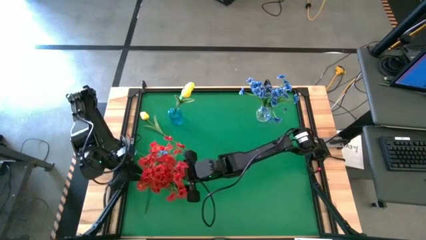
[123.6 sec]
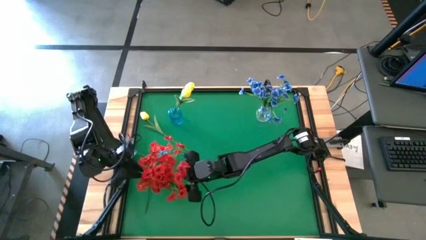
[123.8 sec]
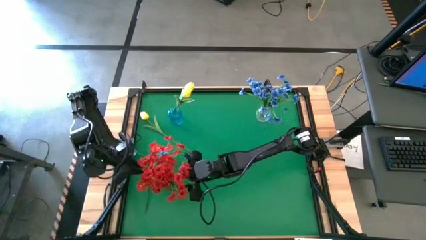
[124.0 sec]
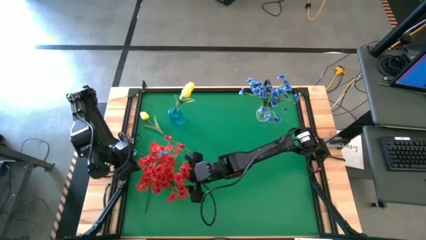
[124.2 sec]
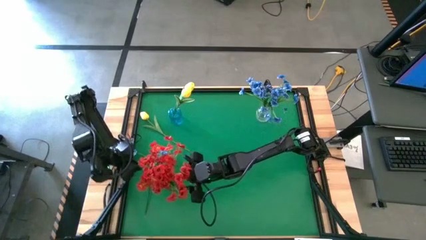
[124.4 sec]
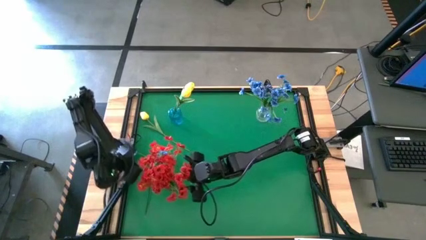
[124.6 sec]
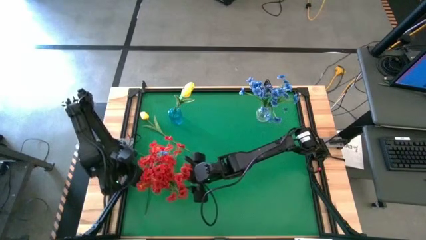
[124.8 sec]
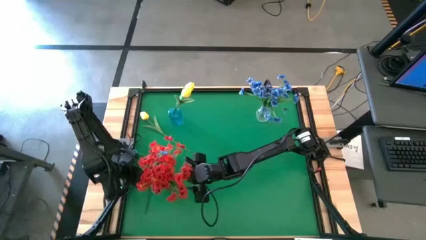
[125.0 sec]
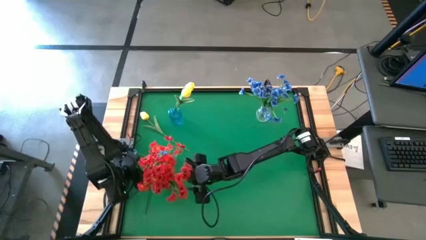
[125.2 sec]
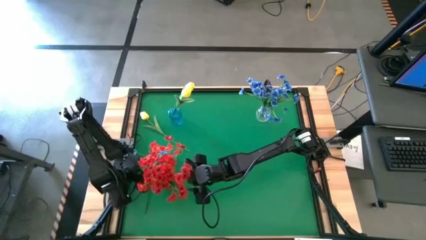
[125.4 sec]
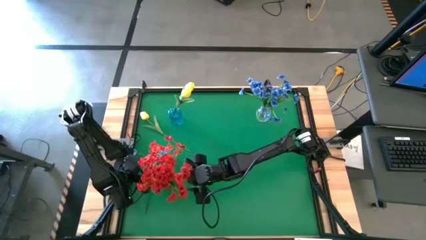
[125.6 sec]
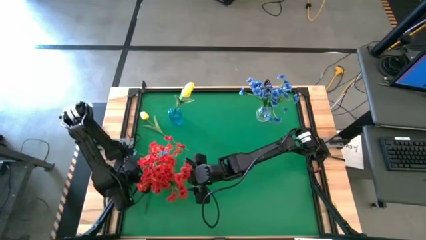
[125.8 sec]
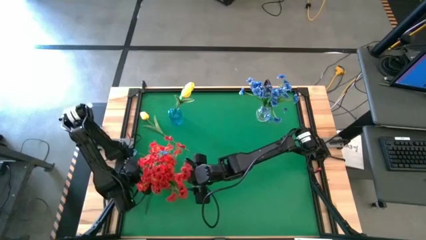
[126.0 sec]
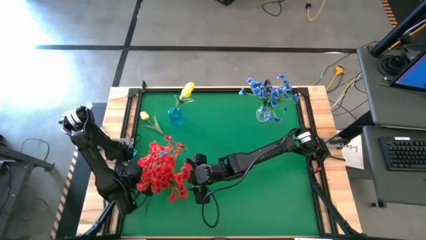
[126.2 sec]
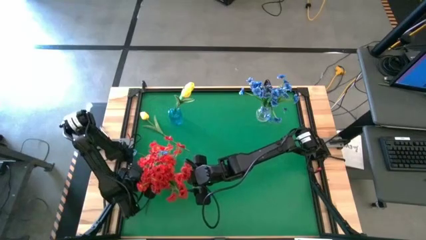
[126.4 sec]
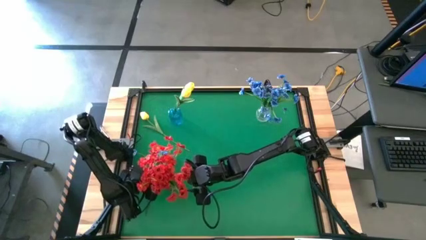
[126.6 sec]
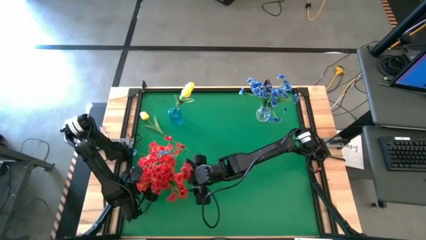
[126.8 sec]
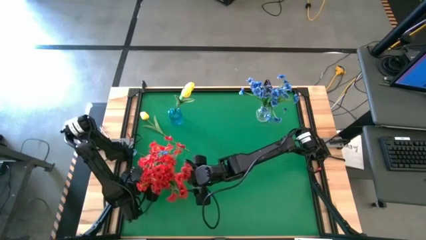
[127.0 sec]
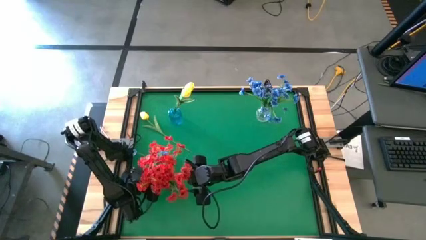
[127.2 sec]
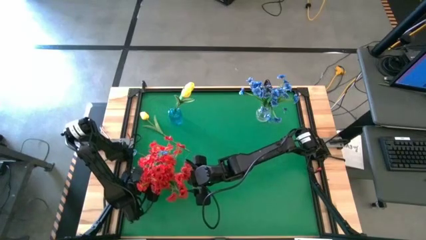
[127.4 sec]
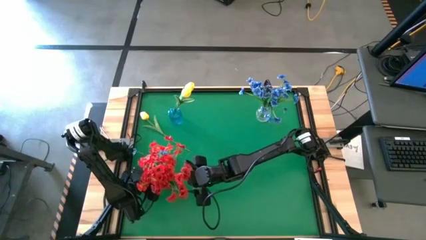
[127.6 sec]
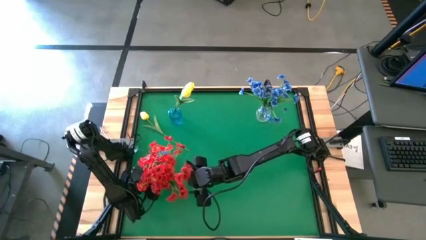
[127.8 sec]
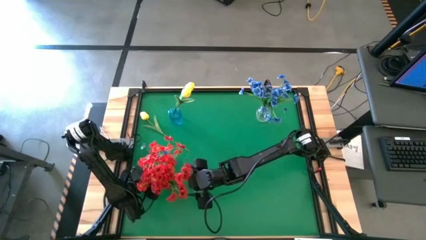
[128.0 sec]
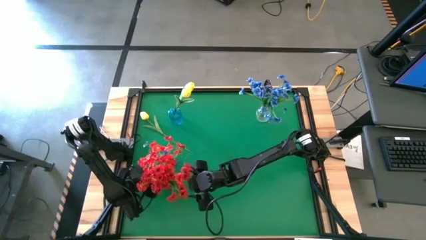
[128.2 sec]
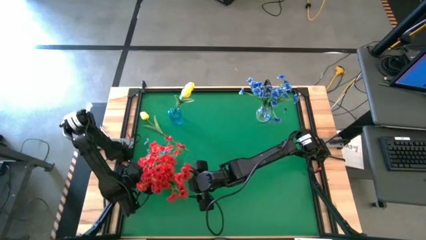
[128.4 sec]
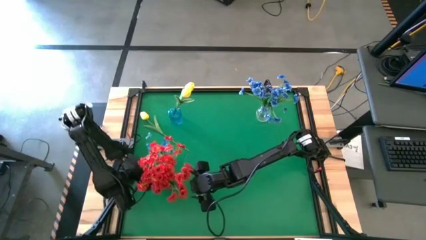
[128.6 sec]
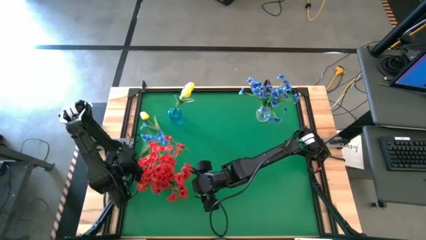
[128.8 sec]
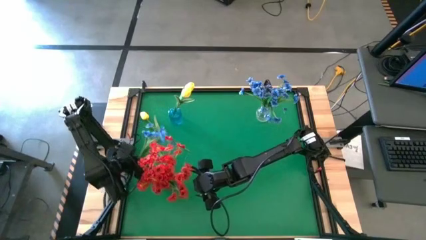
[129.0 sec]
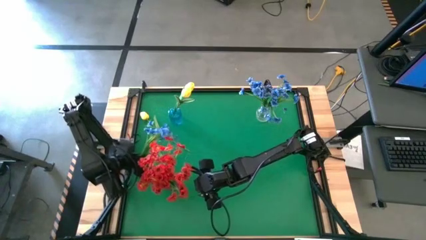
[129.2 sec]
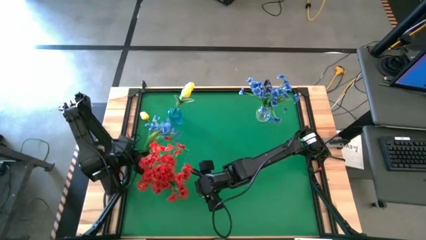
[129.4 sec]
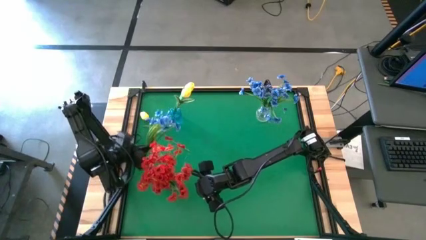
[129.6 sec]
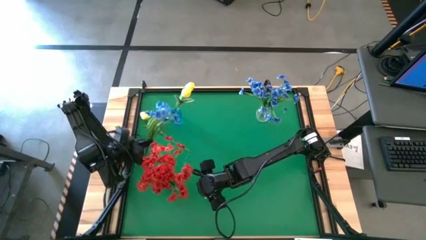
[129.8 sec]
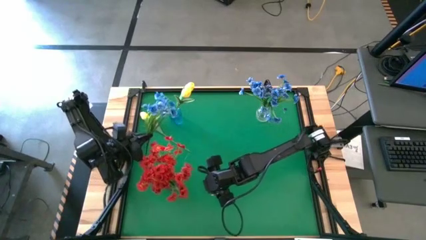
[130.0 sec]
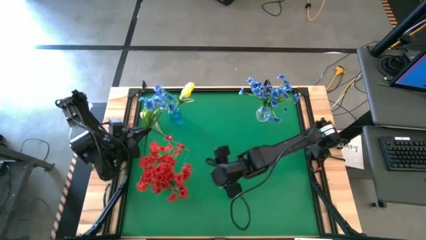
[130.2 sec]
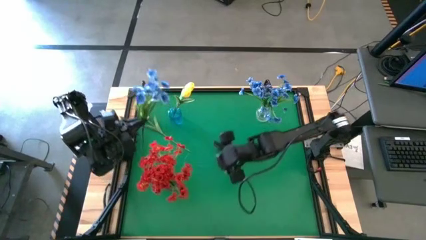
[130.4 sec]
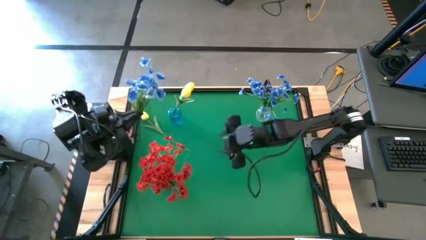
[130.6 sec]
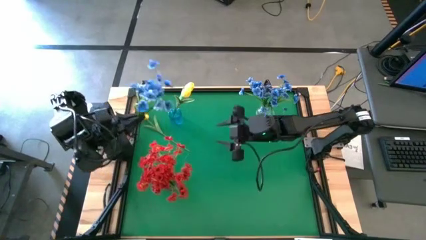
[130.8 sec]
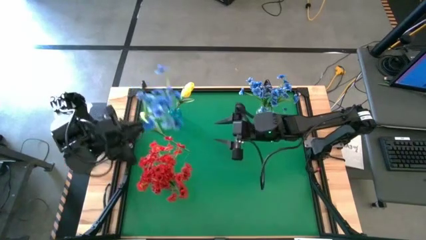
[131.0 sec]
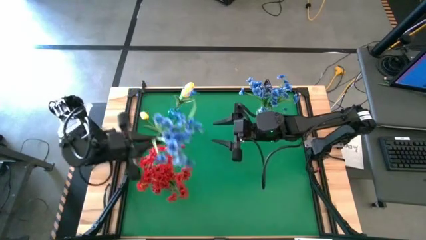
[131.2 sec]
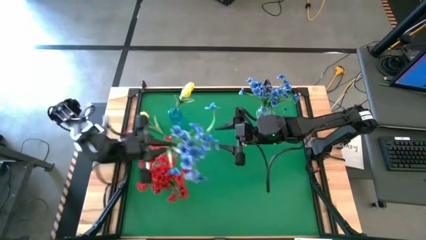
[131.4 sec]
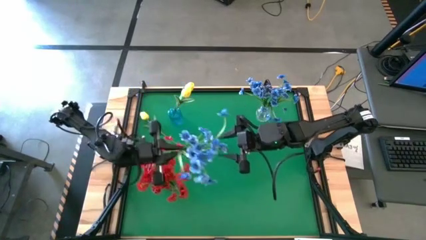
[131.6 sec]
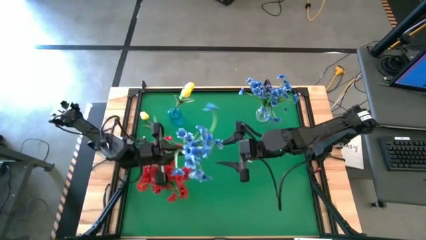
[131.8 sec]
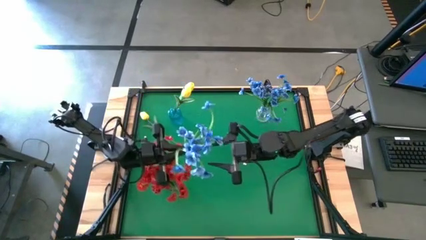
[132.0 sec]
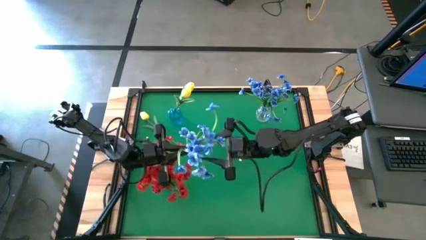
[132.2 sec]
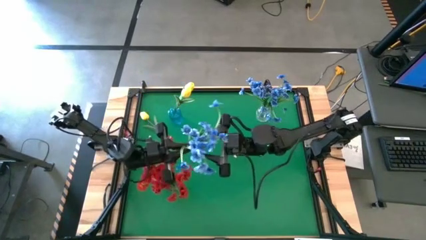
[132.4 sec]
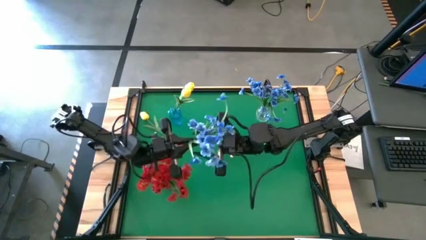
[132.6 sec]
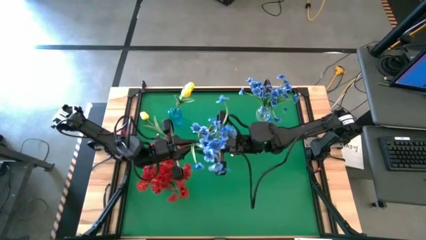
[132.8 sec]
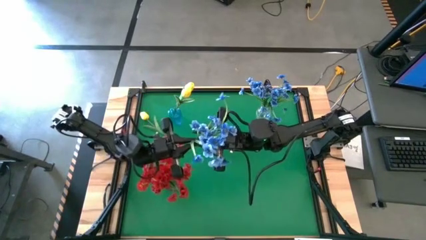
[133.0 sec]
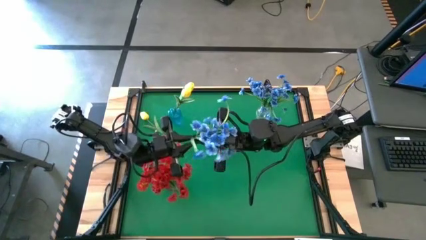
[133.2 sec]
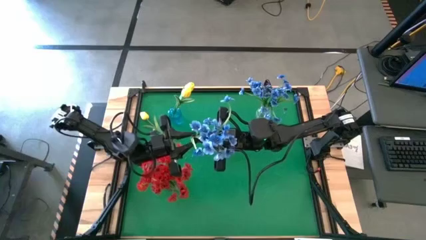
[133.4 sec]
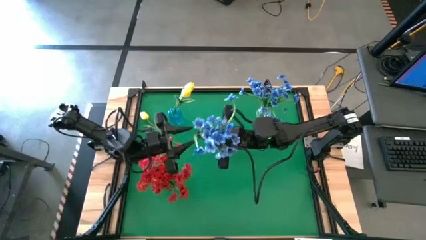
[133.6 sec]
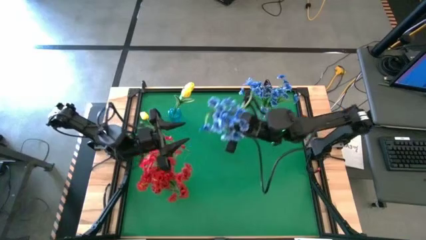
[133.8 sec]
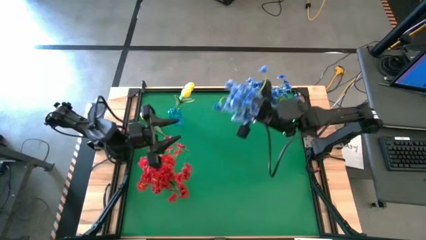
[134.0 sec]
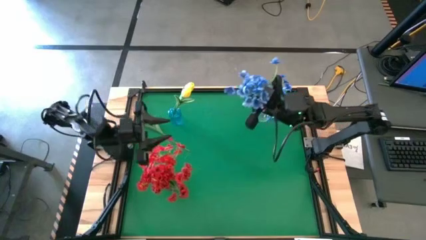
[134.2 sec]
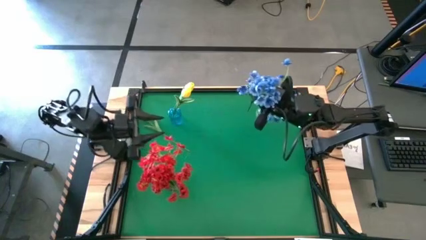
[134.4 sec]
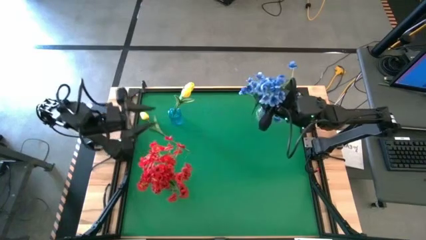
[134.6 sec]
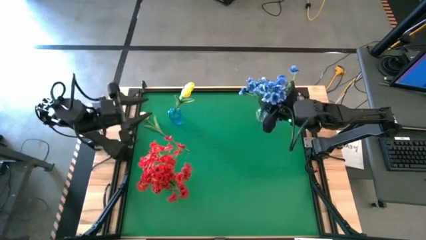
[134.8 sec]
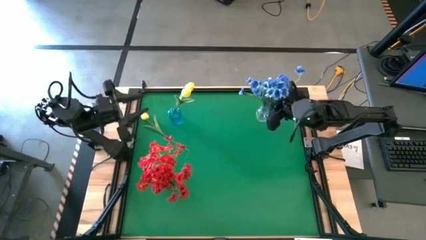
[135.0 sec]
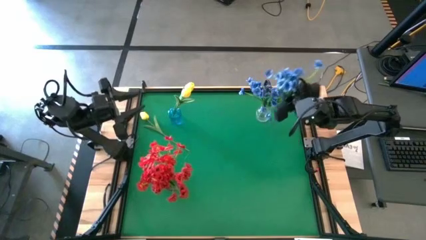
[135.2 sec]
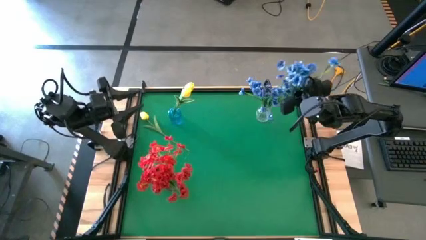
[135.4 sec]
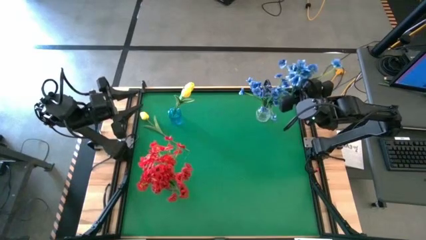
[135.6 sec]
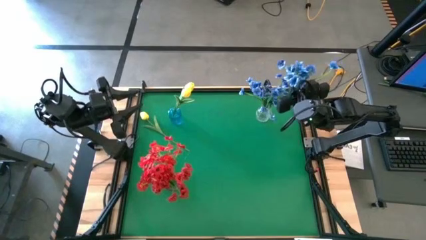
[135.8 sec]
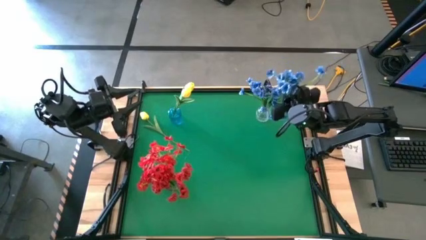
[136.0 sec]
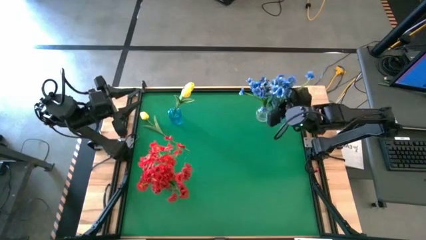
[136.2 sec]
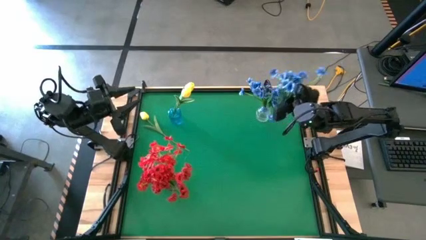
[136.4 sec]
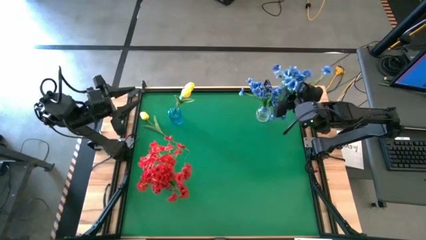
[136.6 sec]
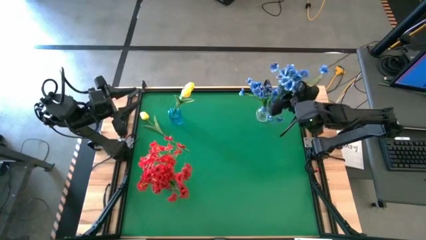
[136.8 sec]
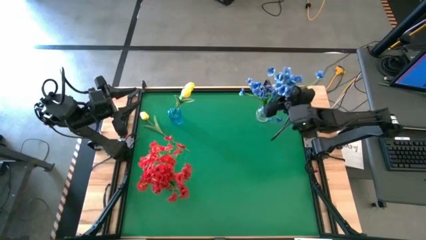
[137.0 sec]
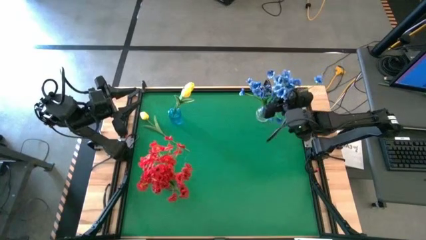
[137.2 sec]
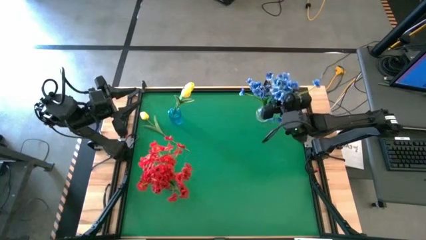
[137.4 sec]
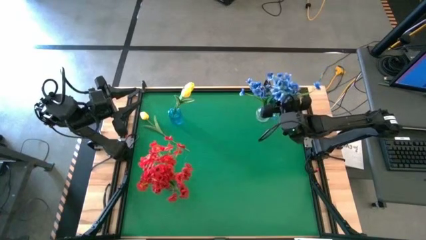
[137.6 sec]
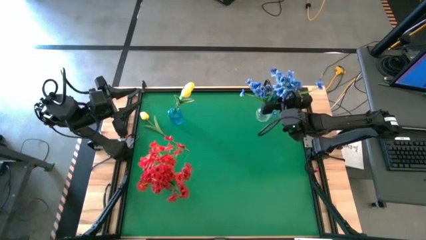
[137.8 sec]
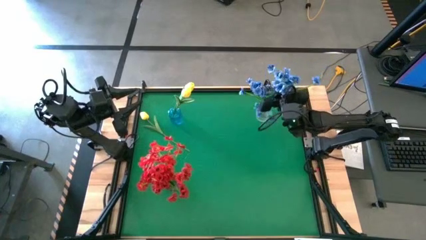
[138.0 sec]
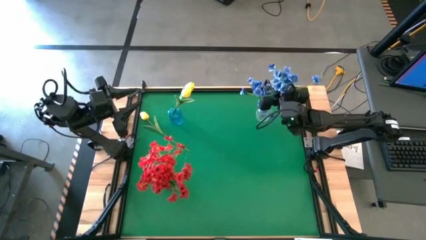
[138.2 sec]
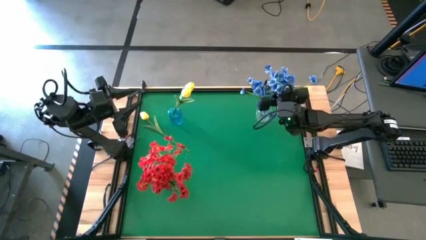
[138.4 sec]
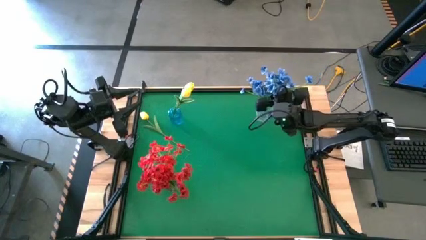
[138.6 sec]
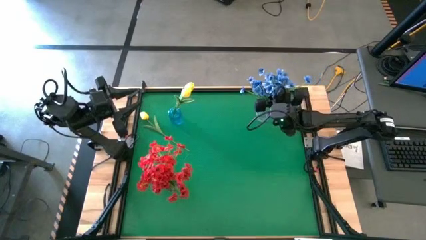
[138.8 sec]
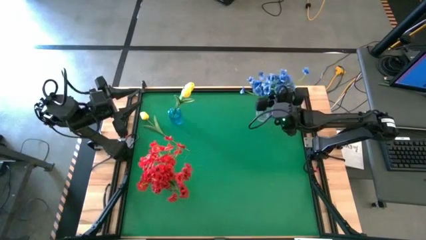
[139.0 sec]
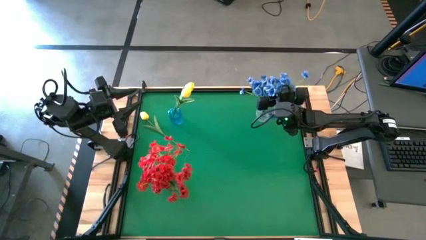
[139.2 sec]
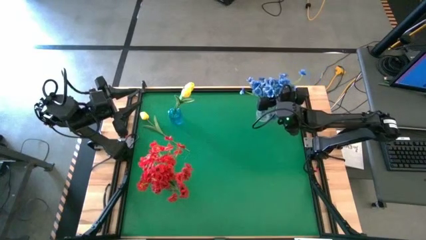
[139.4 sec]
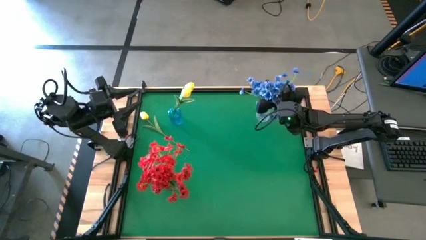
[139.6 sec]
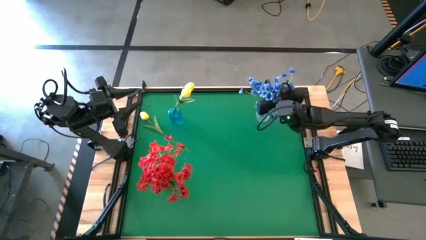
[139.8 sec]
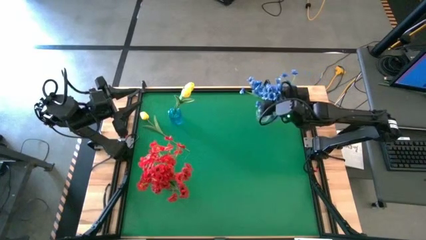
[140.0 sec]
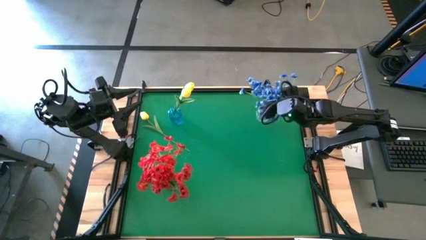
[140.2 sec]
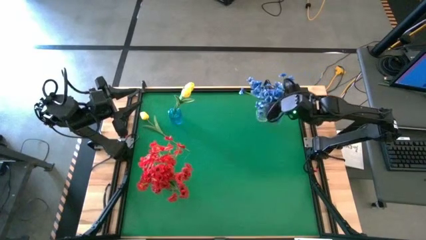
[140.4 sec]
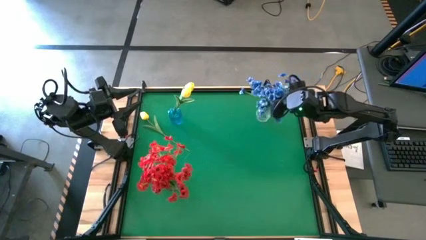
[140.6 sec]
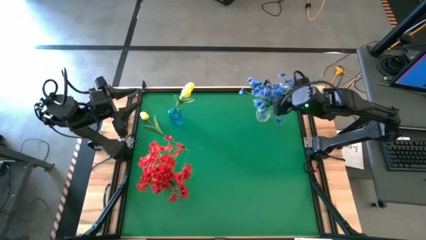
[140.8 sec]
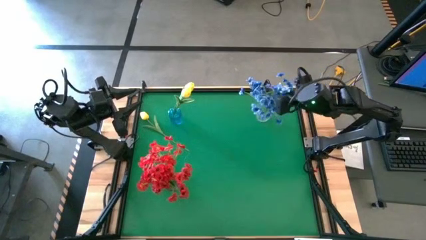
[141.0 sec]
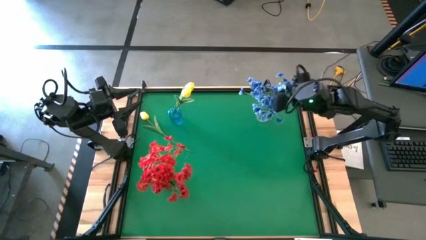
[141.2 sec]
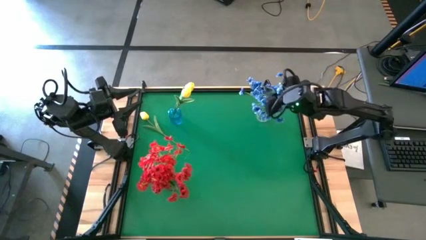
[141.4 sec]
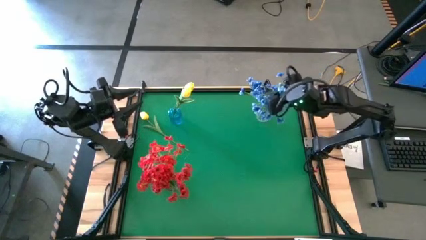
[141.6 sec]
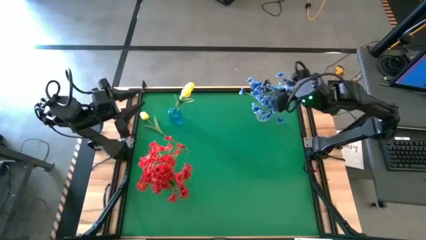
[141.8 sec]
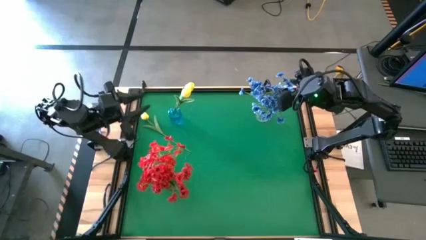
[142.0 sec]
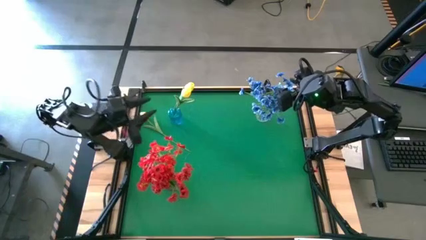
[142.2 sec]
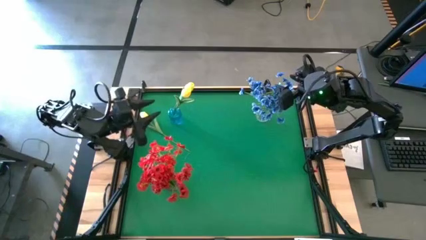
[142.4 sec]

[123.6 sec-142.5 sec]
Task: Sort flowers into vase by color
Put the blue flowers into the transparent vase
